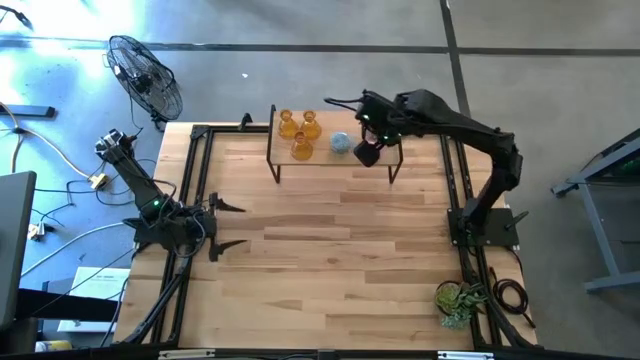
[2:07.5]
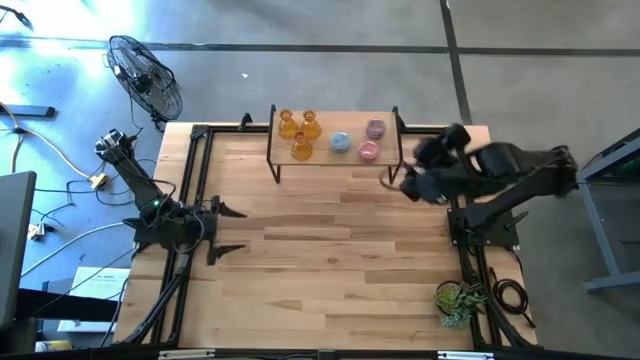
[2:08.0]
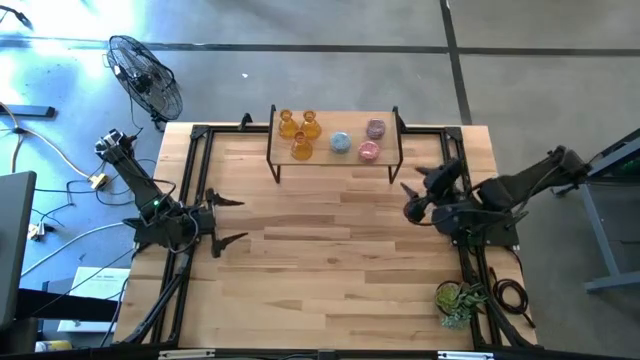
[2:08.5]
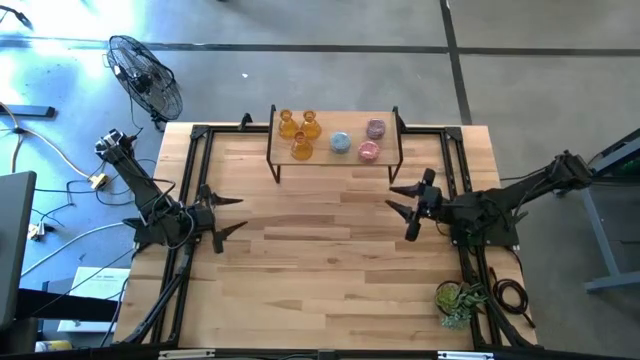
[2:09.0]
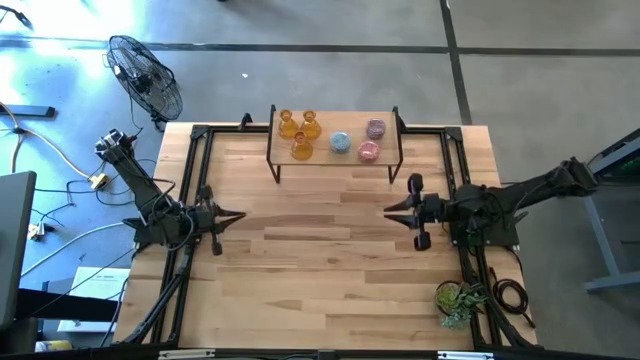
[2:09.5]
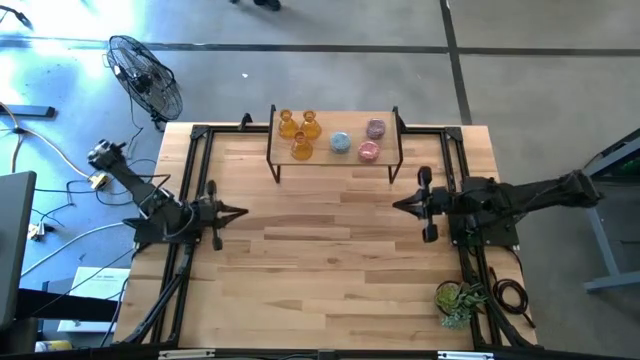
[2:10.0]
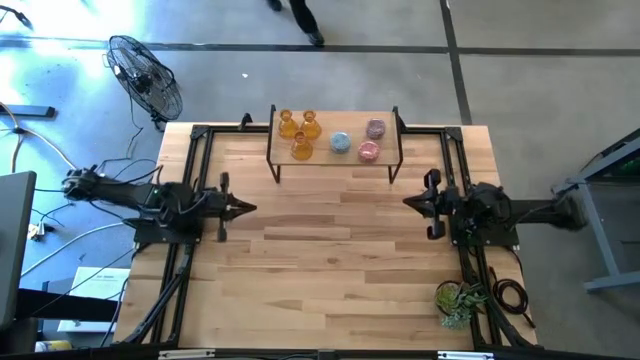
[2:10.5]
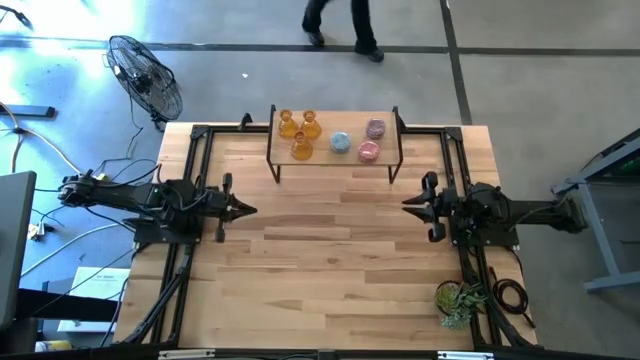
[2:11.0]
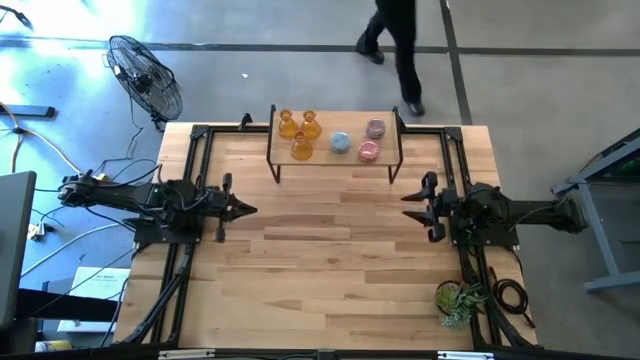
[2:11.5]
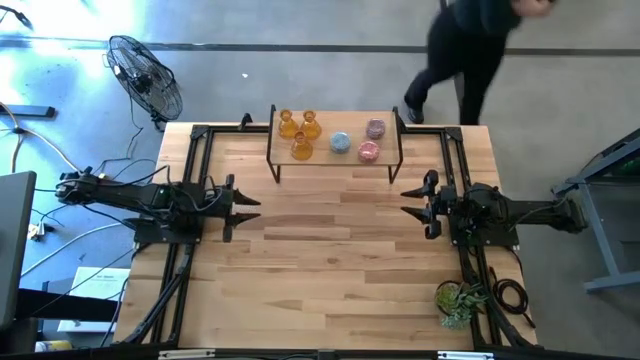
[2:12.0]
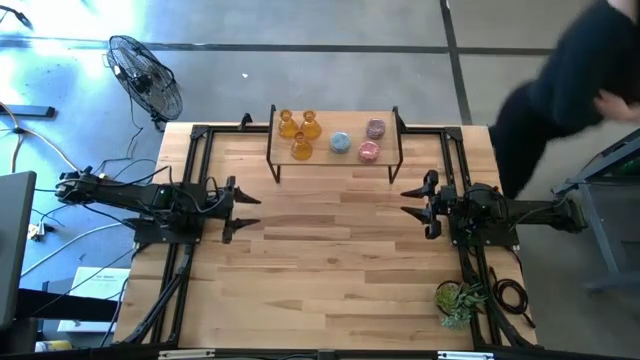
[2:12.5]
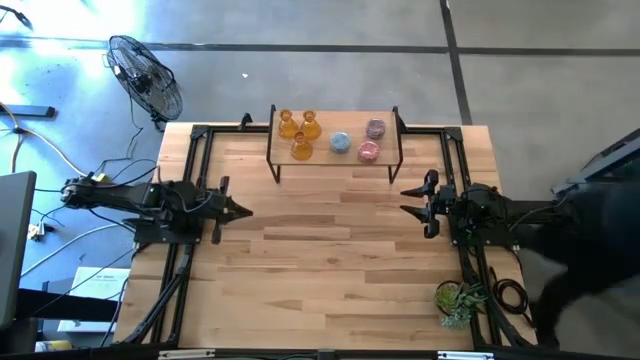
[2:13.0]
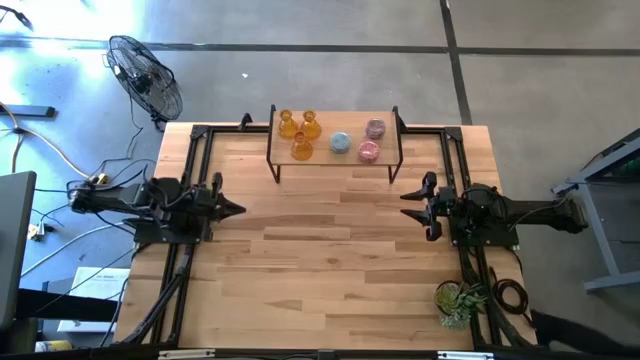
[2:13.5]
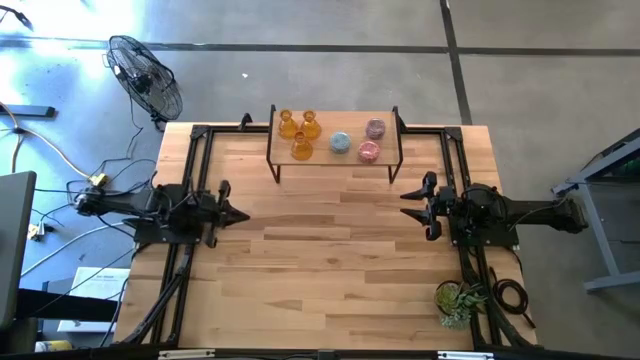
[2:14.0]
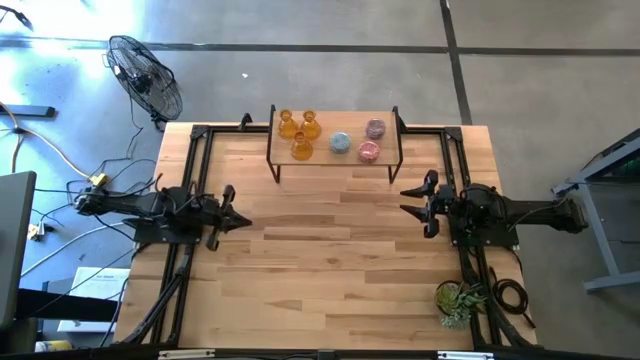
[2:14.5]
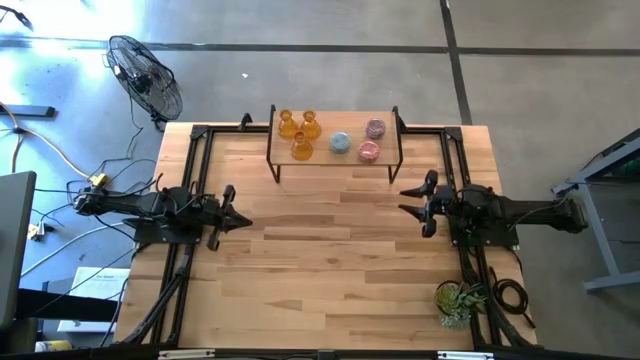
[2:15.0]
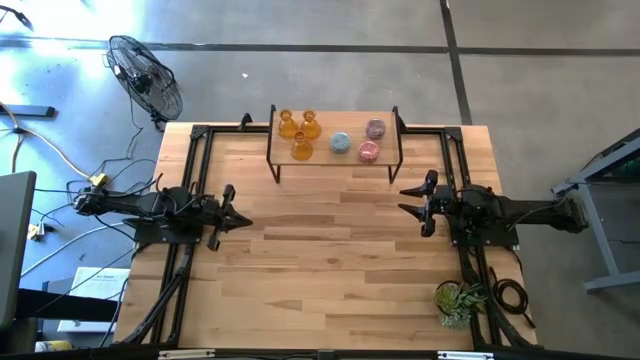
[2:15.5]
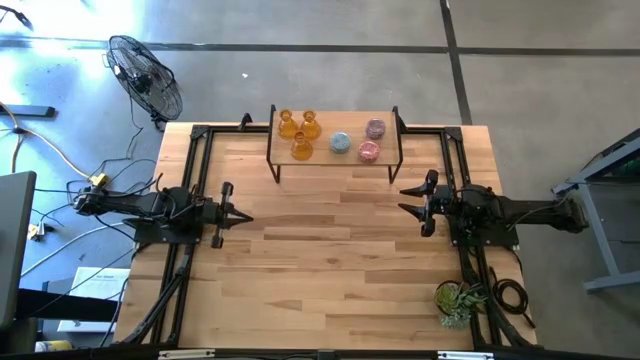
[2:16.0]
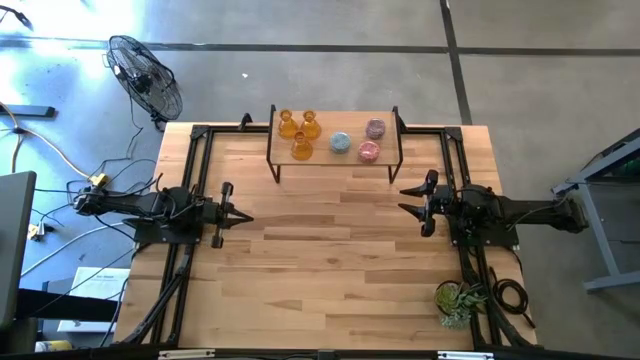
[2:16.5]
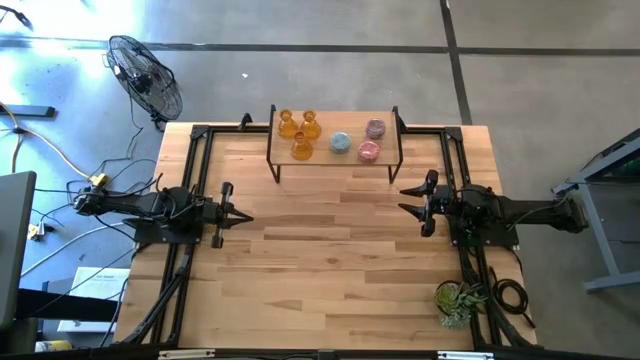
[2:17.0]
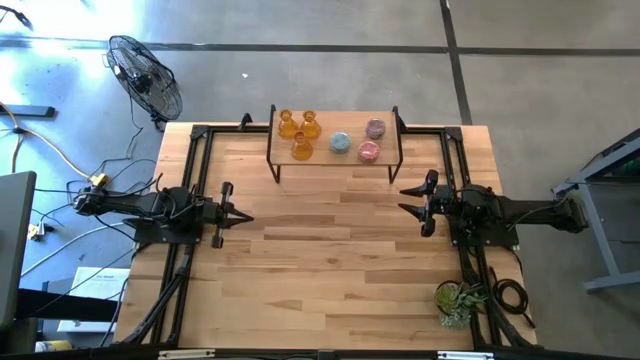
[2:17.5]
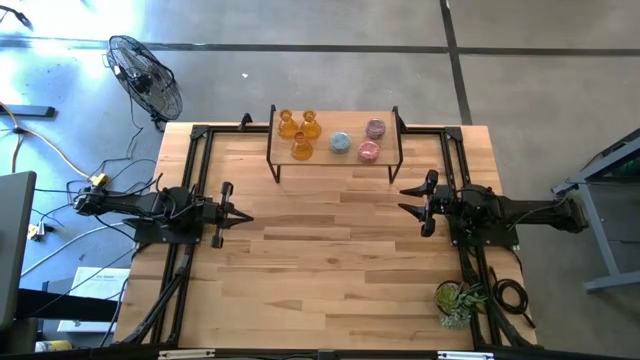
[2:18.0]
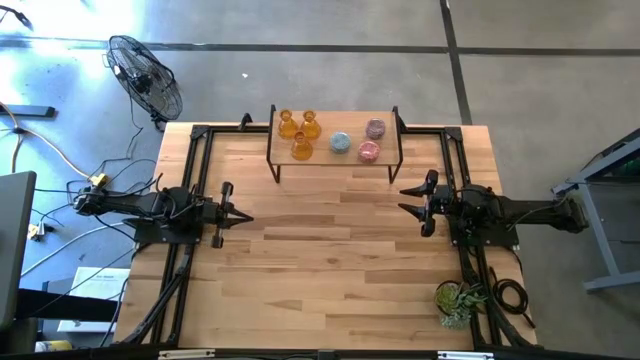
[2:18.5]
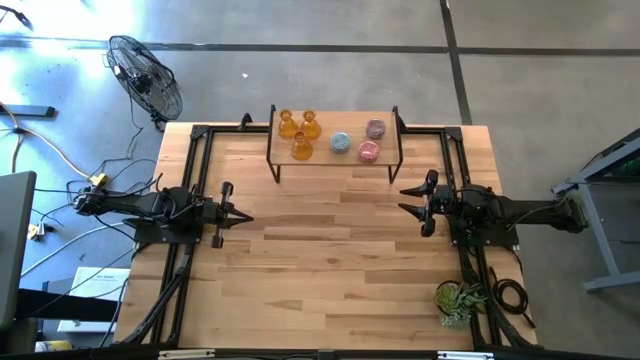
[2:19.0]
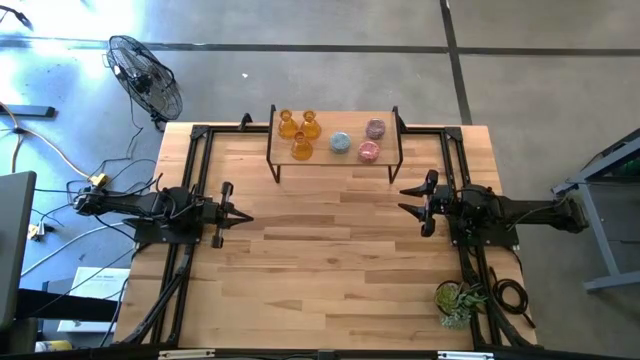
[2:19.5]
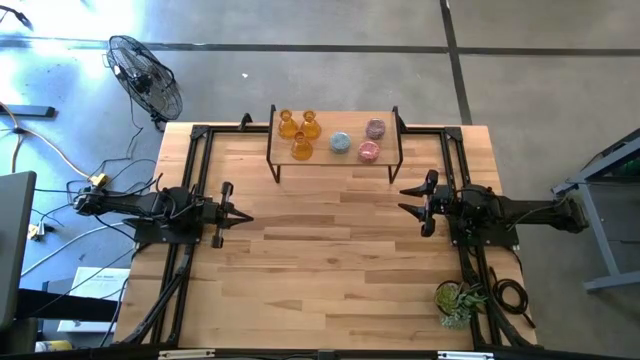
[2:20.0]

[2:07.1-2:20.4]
Task: Pick & Place candle stick holders
Return to Home Position

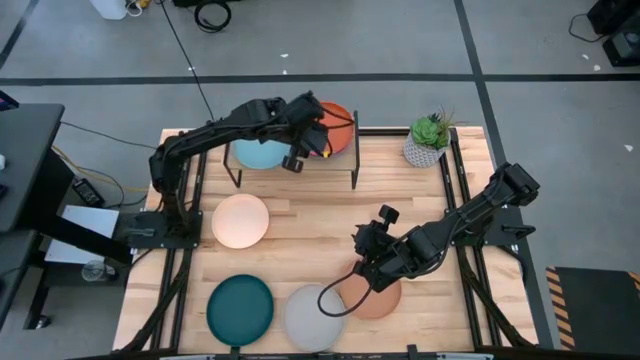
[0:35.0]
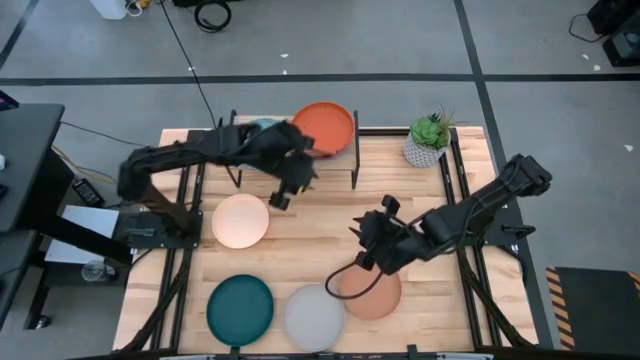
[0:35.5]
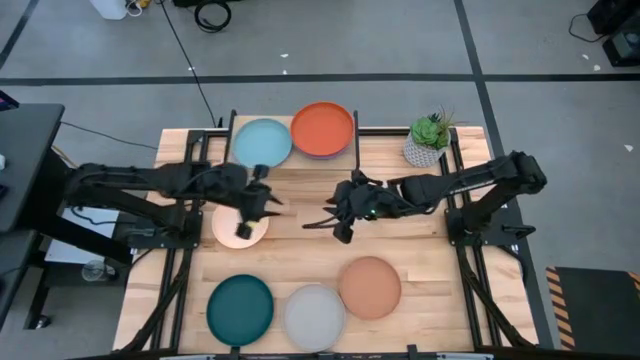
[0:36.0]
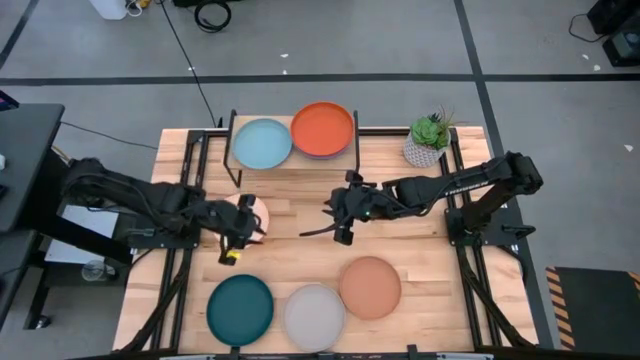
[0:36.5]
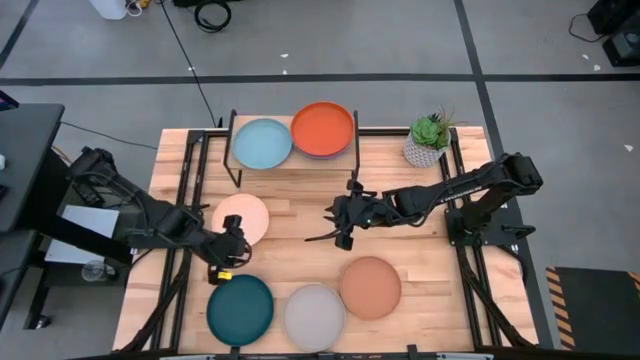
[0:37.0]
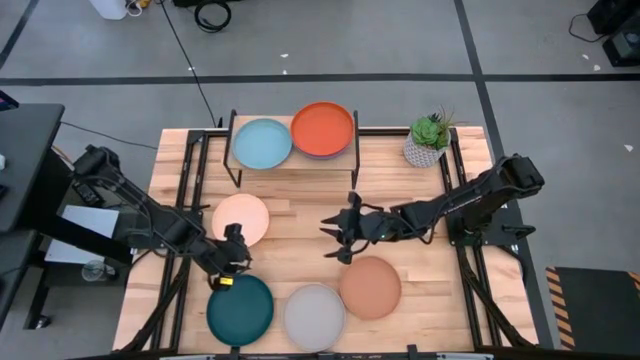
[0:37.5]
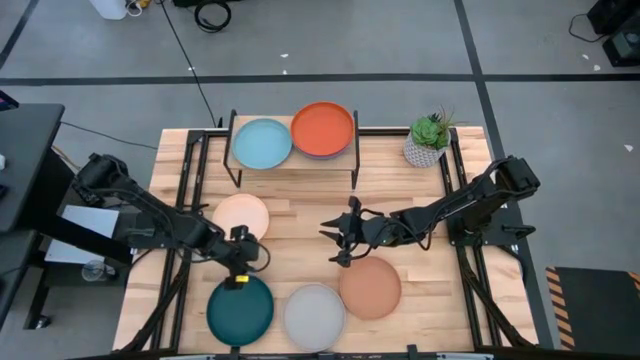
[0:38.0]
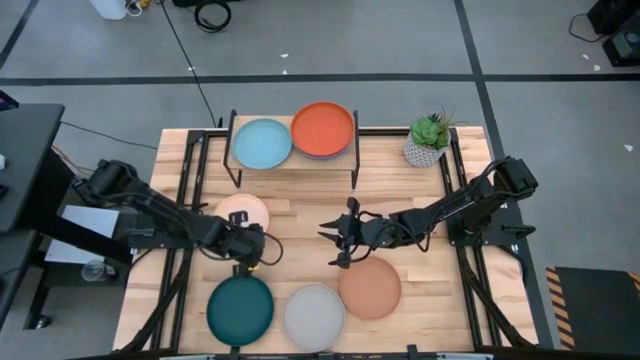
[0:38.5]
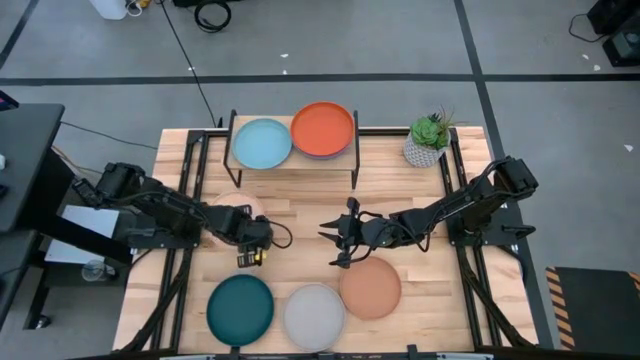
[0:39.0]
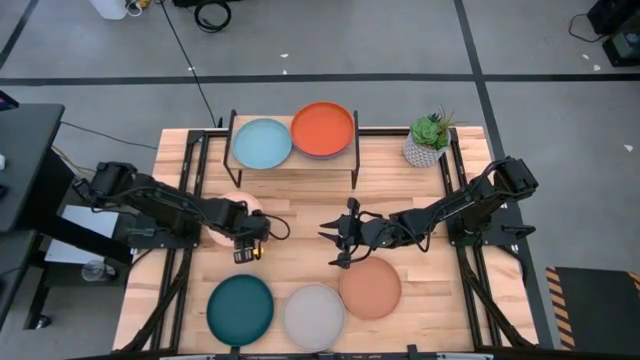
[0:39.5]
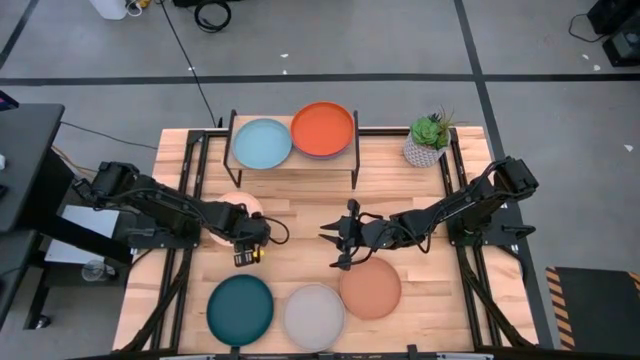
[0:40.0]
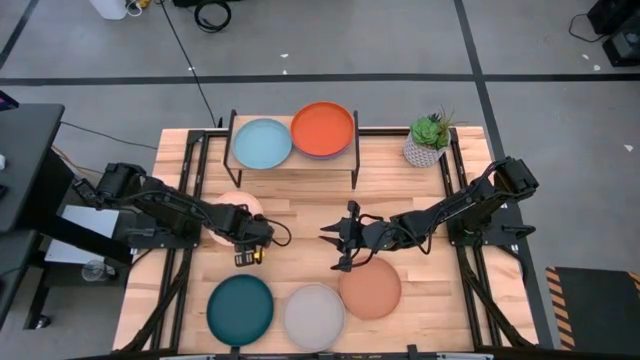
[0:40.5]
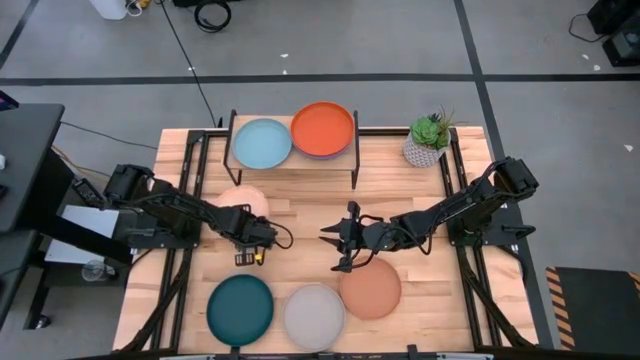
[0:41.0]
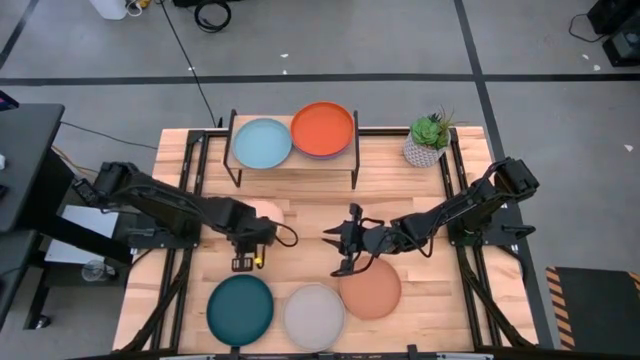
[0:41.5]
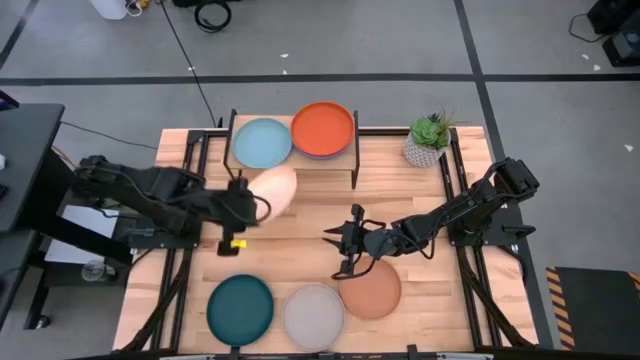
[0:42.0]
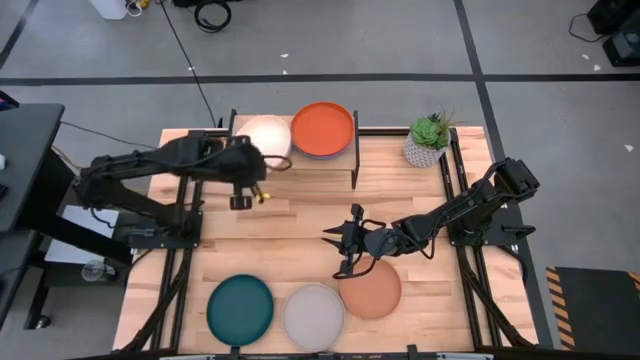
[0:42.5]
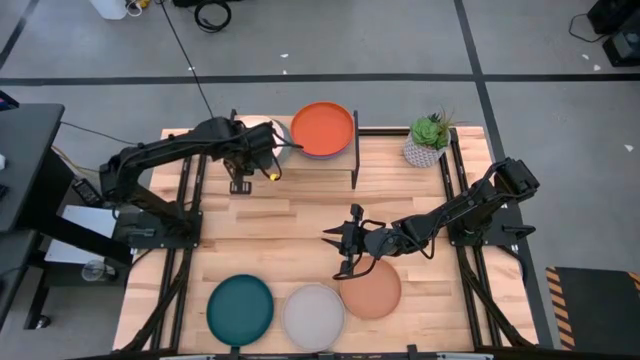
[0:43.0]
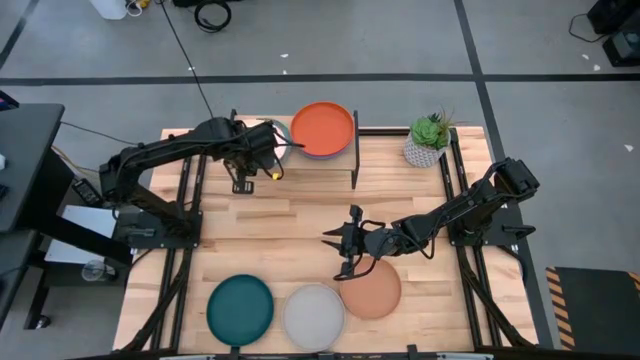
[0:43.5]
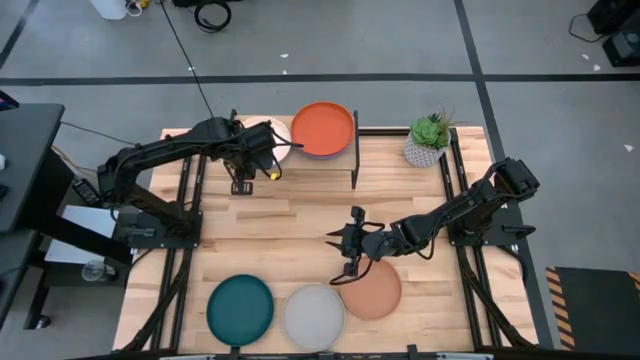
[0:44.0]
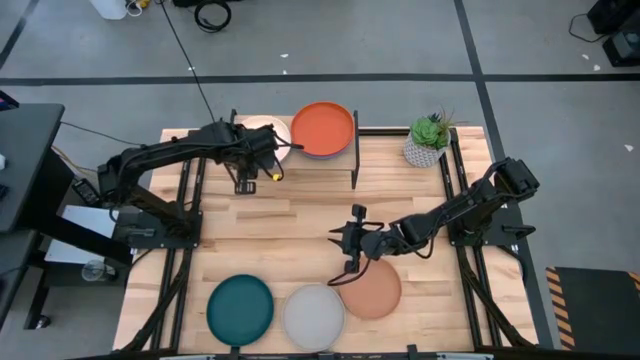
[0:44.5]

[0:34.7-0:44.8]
Task: Place and stack plates onto a shelf
Stack the light orange plate on top of the light blue plate on the shelf
